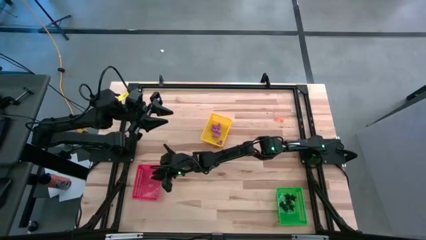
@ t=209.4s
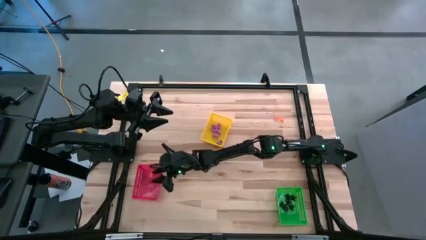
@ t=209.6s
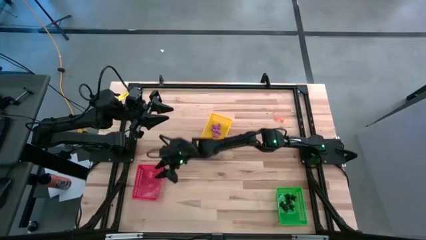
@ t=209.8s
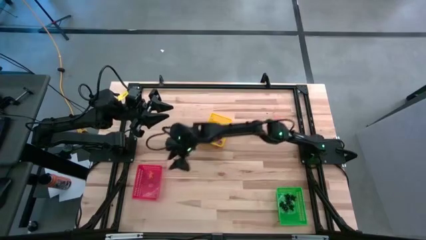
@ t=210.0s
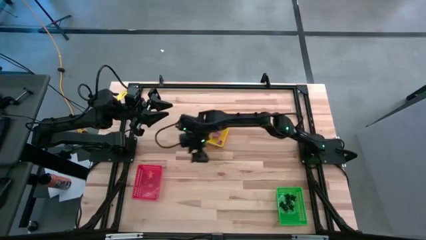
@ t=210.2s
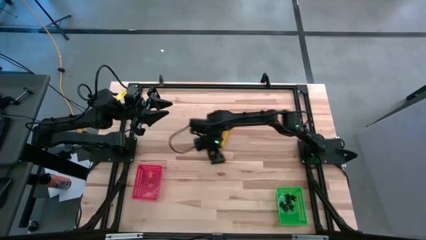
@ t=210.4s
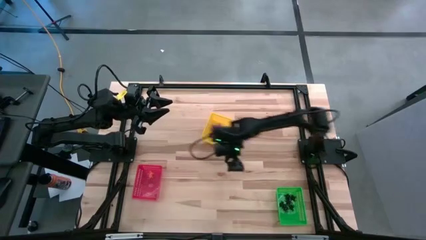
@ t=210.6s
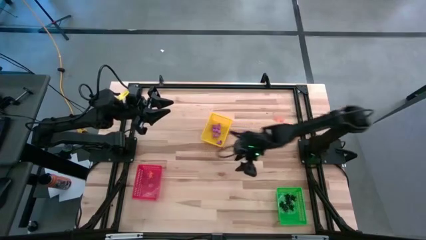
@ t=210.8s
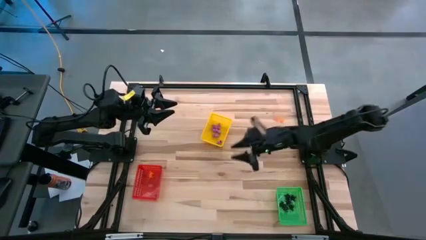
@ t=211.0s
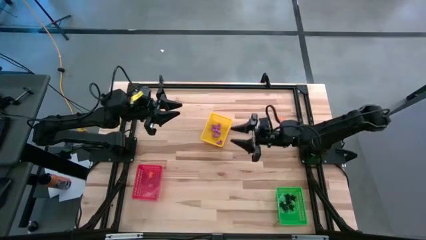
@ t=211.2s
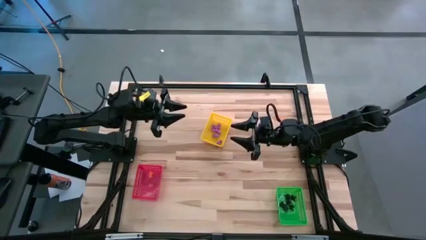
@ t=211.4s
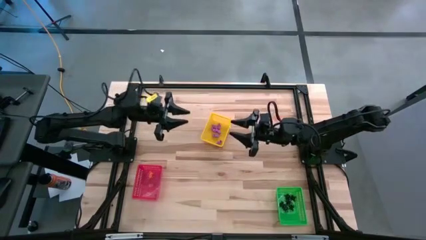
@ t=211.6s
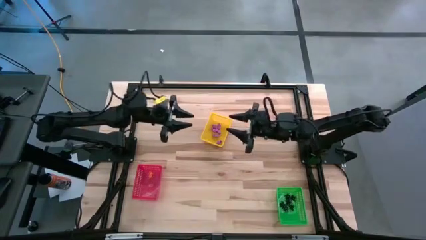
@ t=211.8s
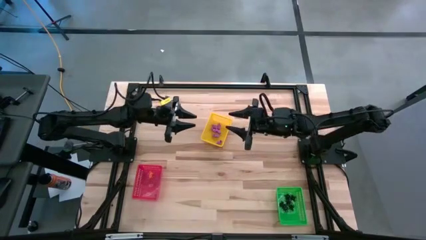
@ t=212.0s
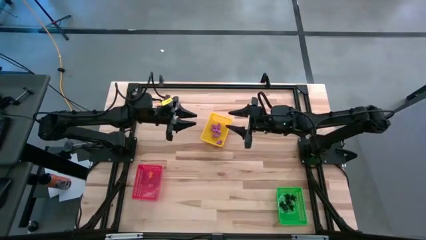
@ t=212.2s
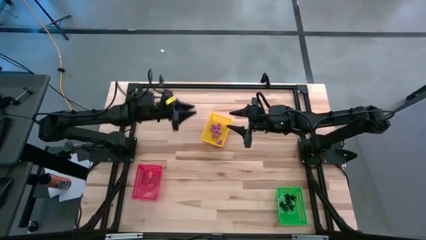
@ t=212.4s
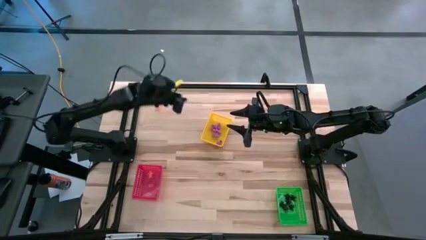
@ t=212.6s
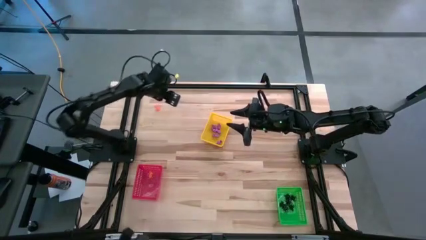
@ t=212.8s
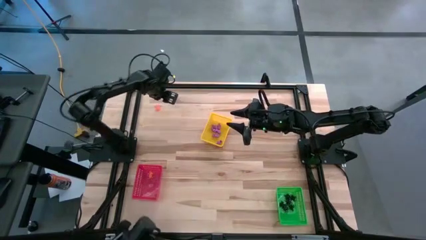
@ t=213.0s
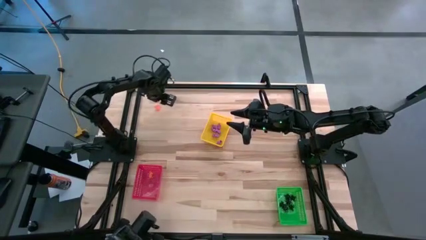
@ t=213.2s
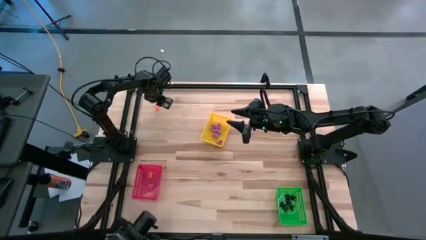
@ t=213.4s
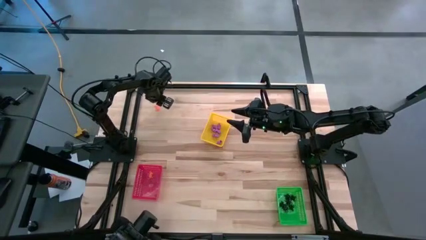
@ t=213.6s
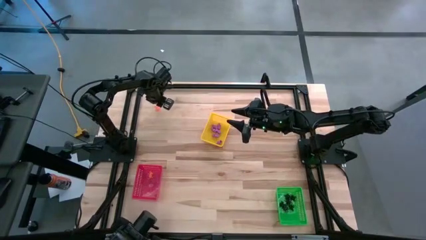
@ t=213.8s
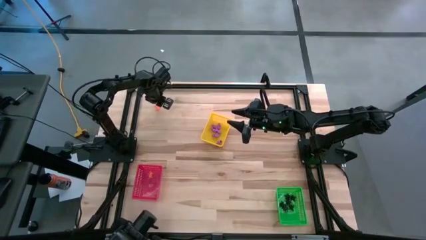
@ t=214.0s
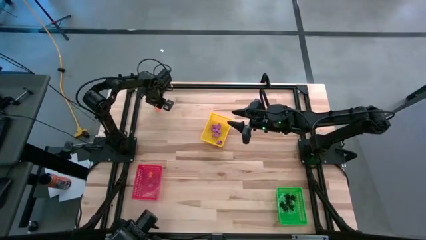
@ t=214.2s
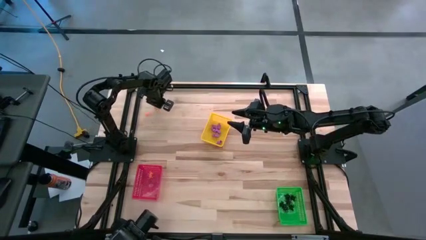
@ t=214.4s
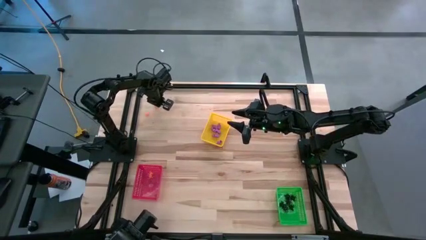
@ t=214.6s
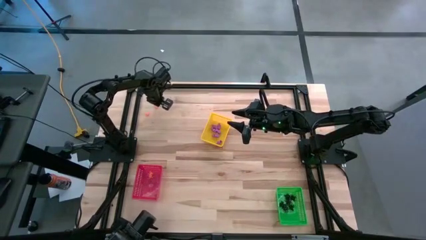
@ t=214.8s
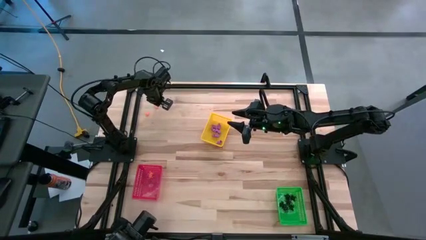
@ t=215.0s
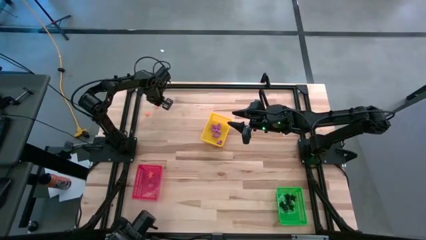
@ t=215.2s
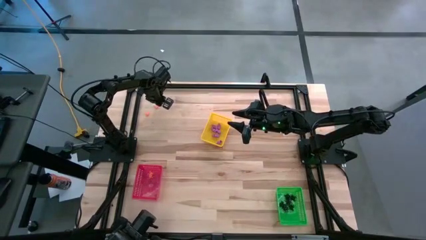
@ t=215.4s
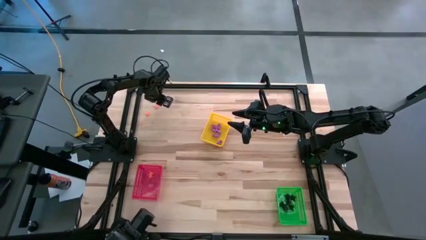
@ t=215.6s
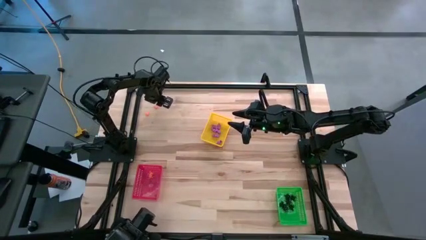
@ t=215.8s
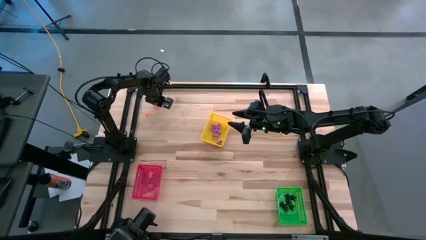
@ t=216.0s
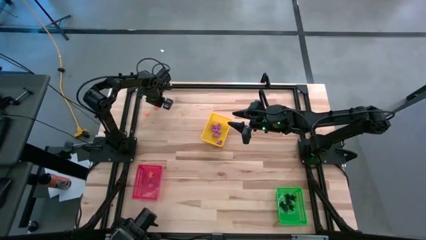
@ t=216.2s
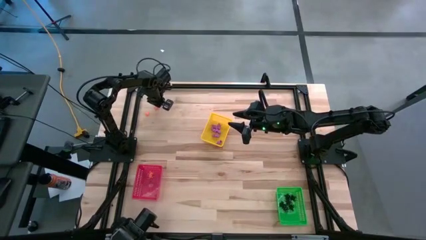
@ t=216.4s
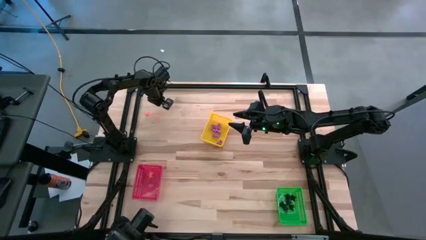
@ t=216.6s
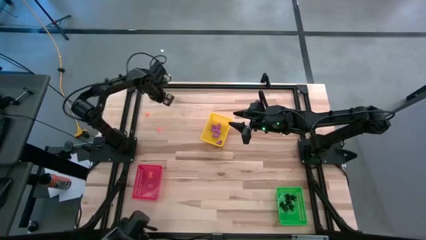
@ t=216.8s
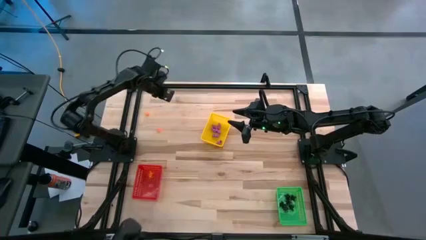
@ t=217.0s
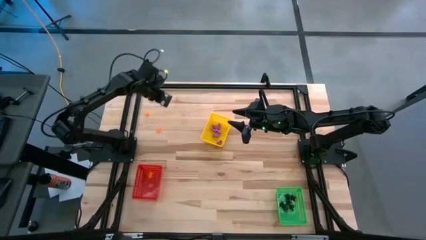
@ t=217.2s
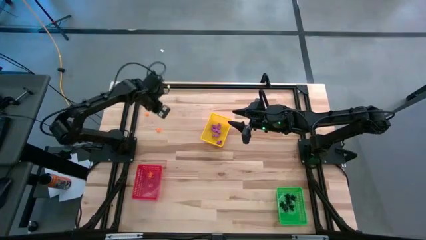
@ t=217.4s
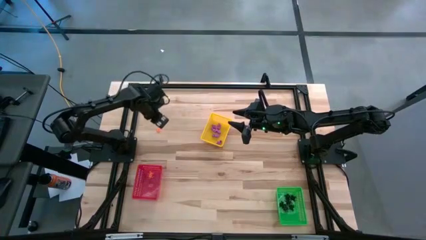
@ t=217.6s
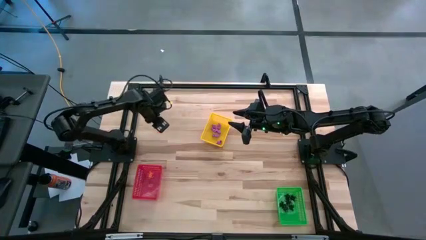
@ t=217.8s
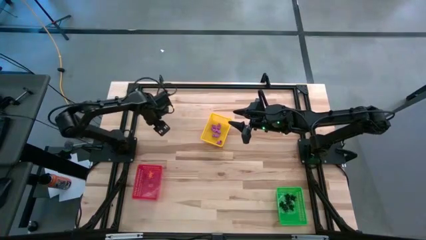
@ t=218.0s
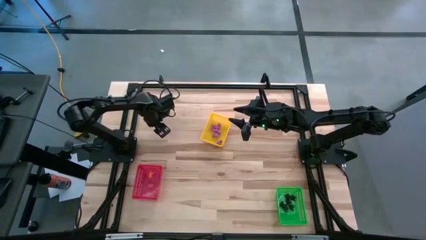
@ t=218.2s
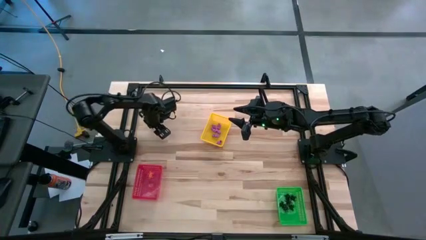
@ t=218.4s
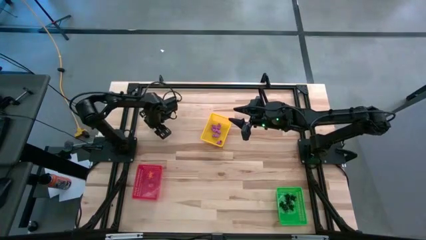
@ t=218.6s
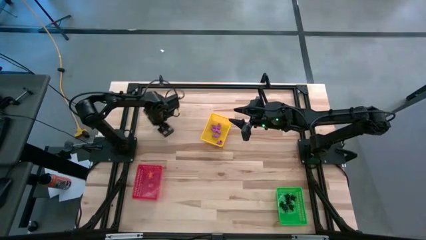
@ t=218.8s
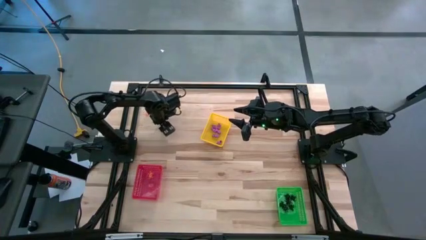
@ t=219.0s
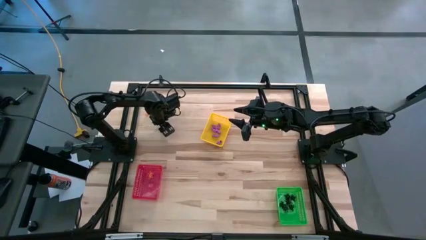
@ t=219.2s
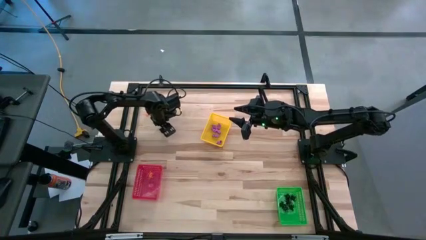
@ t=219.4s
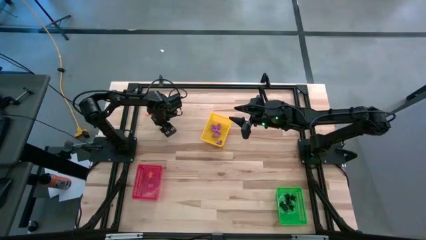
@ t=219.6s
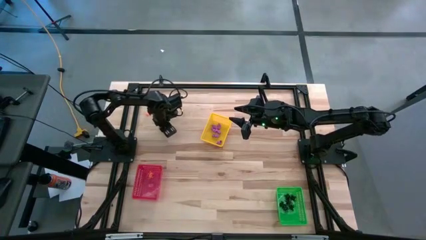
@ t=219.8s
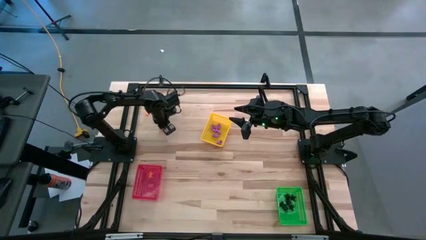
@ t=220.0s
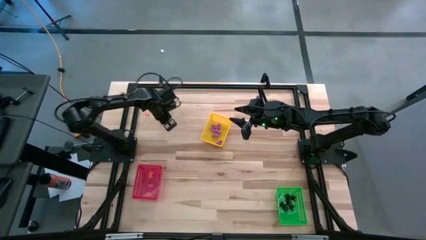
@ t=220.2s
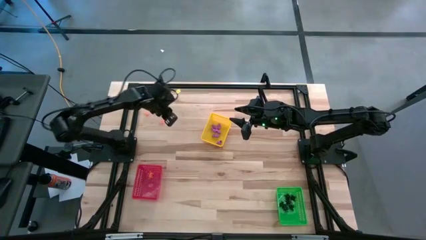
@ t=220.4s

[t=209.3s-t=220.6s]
Task: Sort Halloween decoration
Put the orange spider toy into the red bin

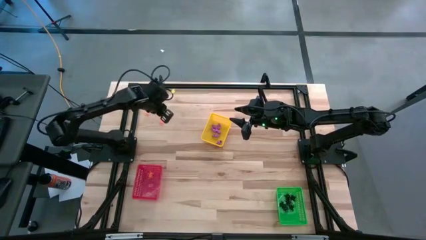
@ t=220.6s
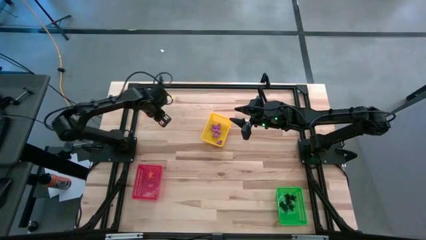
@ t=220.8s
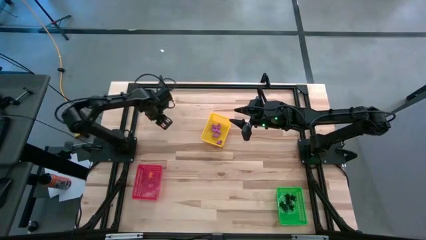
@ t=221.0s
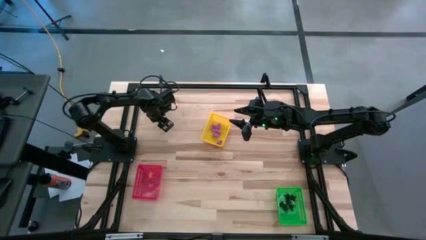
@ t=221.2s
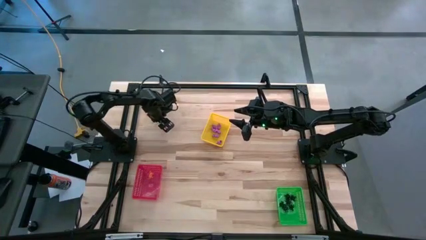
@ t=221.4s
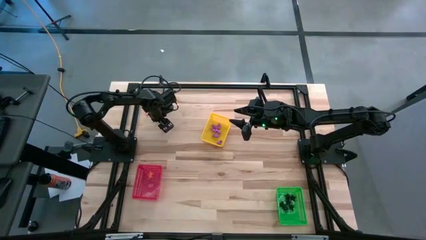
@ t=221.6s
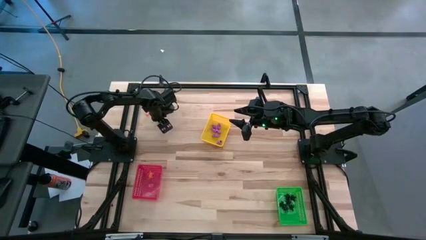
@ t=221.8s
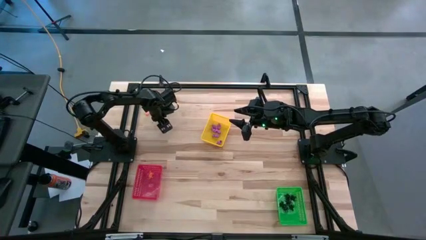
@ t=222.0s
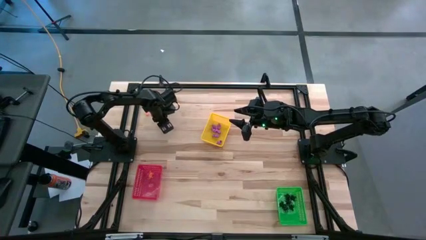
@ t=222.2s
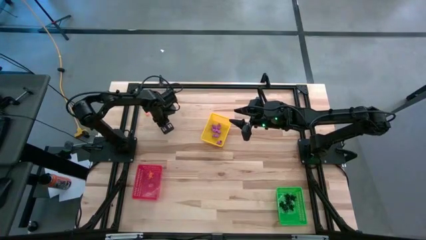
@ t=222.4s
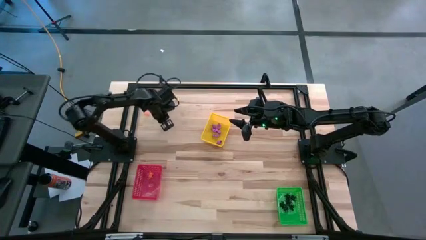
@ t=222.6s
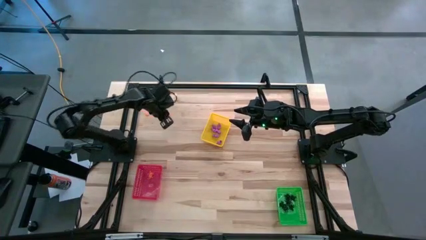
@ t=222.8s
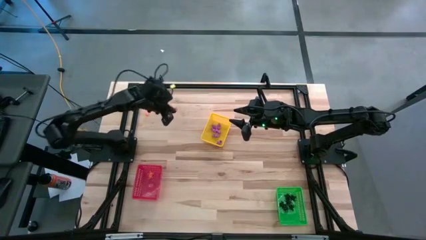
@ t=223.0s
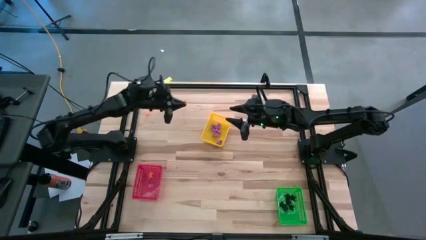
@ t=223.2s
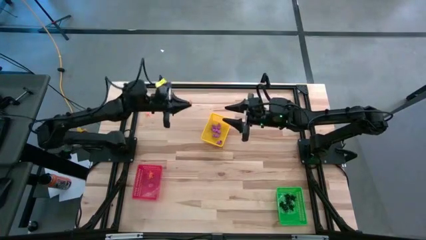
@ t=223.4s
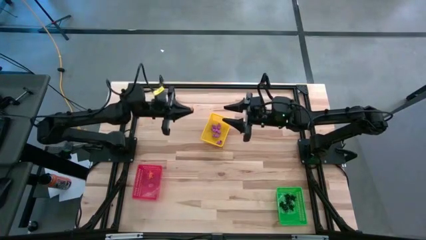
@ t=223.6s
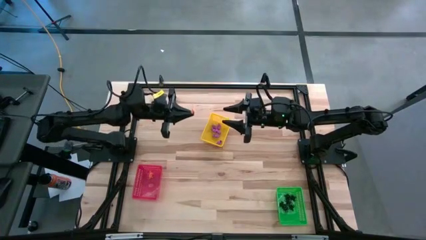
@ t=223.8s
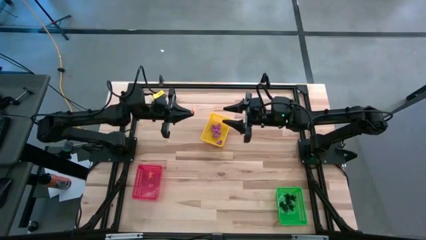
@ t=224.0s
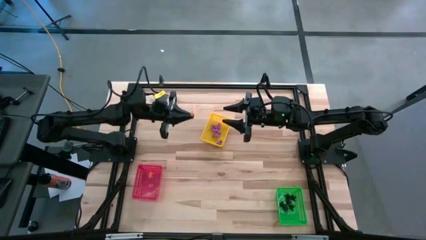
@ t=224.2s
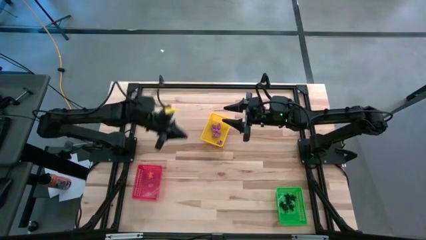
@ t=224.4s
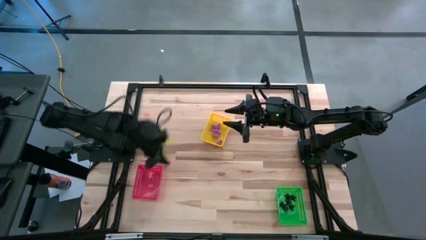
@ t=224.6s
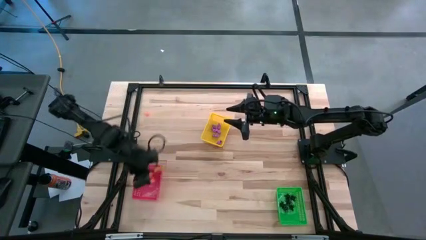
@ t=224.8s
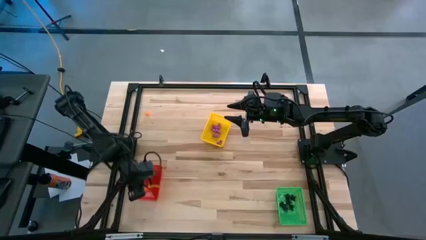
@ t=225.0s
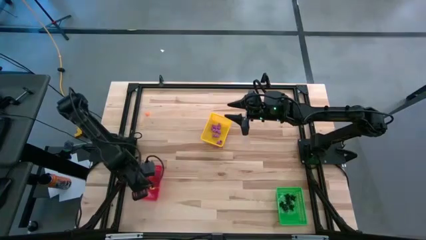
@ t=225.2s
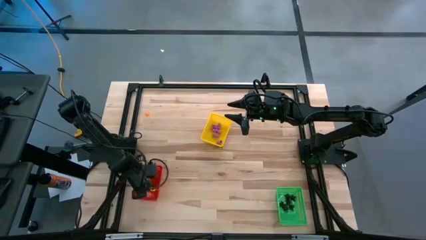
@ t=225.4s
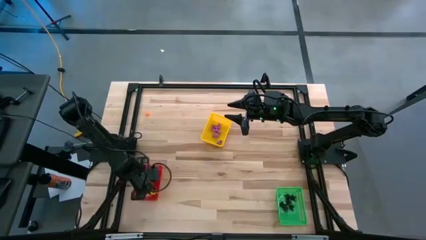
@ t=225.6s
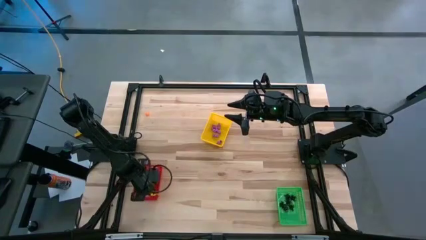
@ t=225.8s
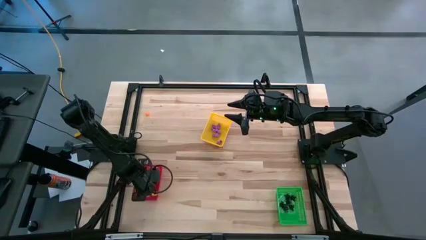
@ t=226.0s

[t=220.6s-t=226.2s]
Put the orange spider toy into the red bin
